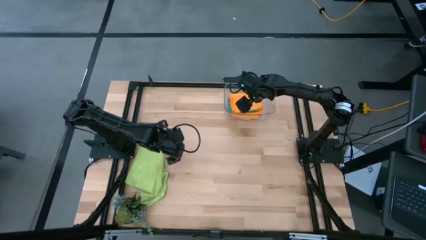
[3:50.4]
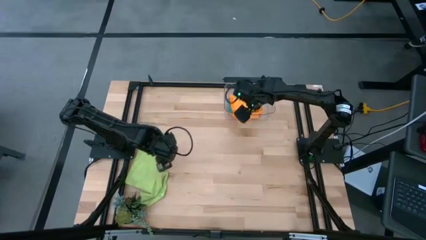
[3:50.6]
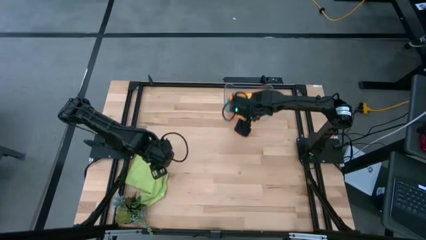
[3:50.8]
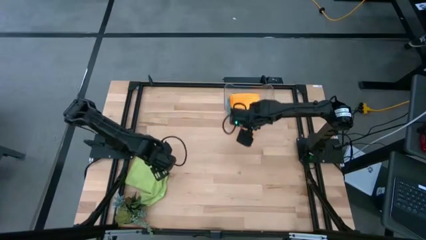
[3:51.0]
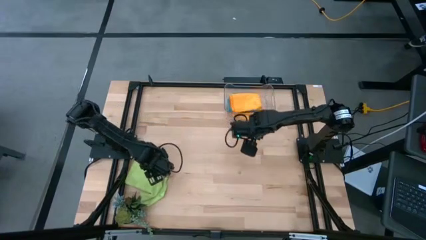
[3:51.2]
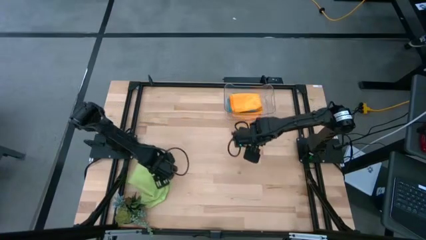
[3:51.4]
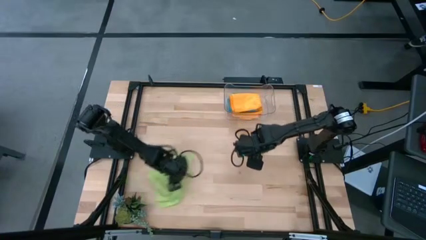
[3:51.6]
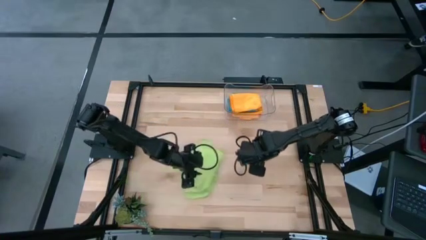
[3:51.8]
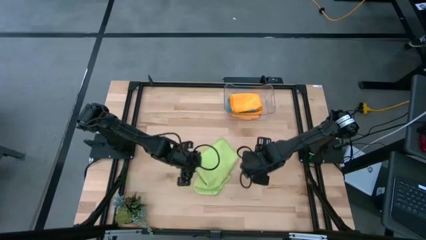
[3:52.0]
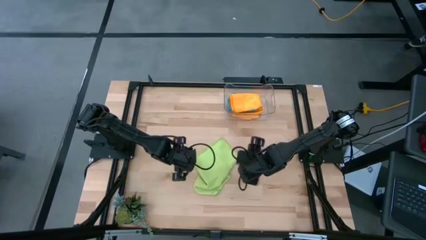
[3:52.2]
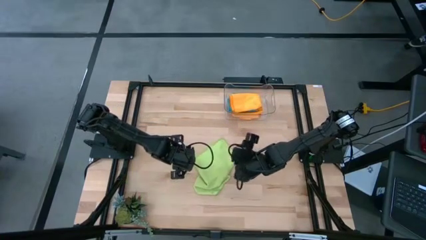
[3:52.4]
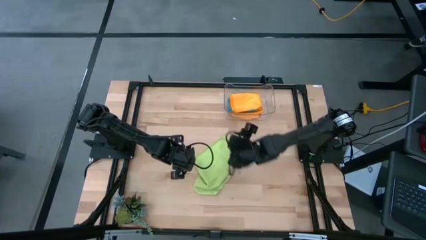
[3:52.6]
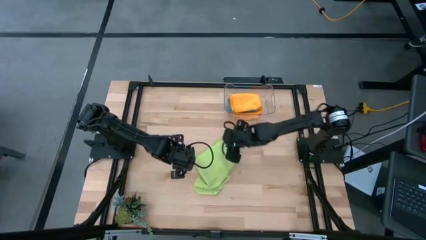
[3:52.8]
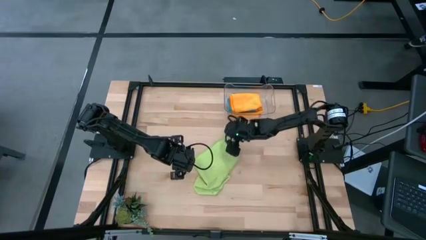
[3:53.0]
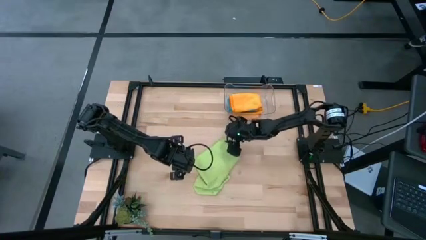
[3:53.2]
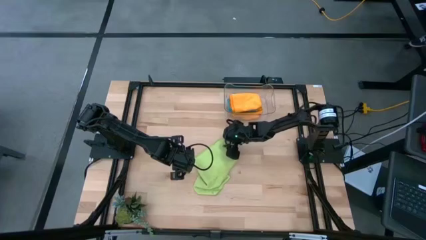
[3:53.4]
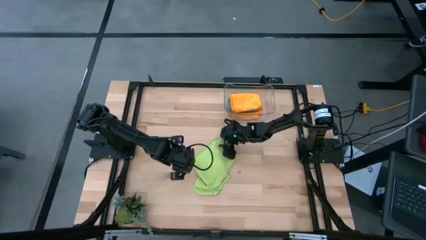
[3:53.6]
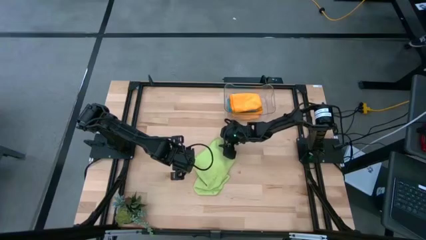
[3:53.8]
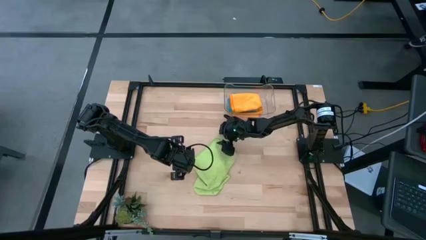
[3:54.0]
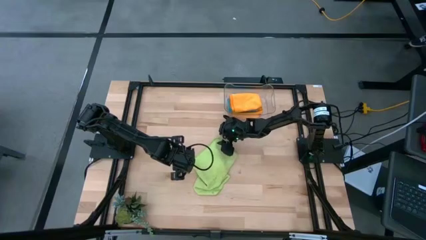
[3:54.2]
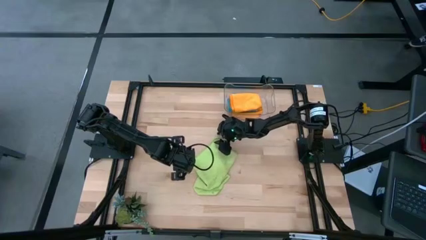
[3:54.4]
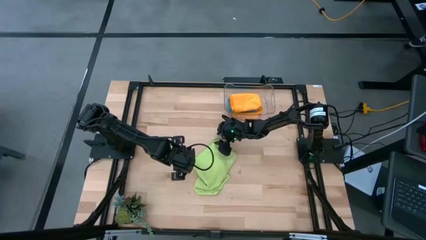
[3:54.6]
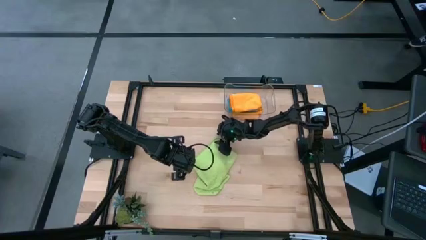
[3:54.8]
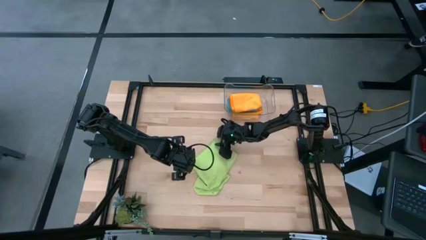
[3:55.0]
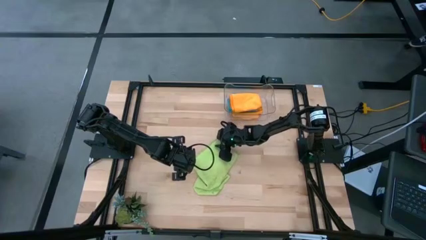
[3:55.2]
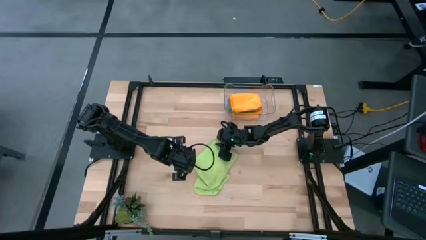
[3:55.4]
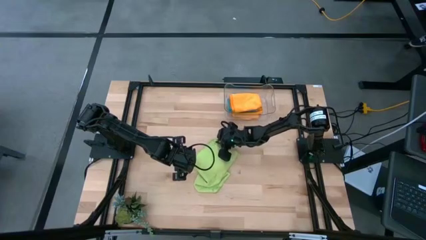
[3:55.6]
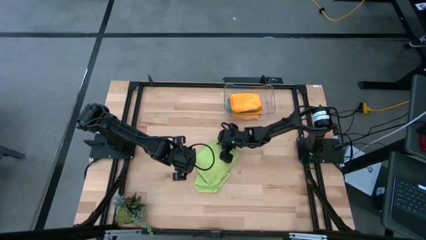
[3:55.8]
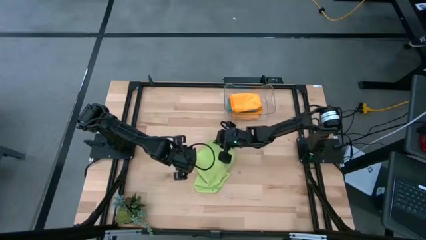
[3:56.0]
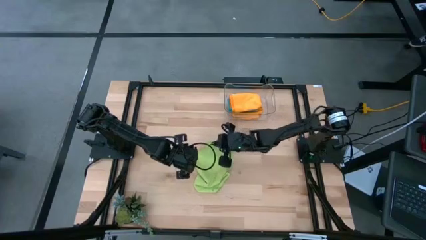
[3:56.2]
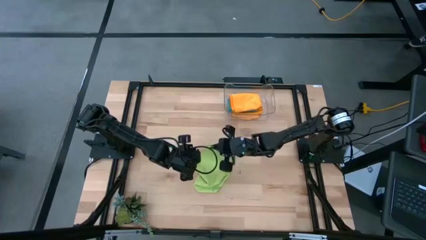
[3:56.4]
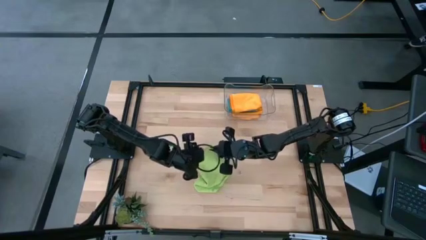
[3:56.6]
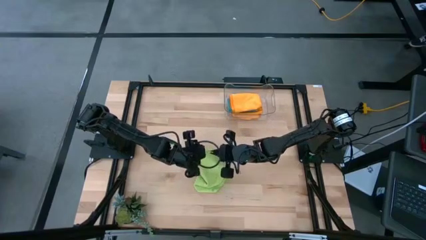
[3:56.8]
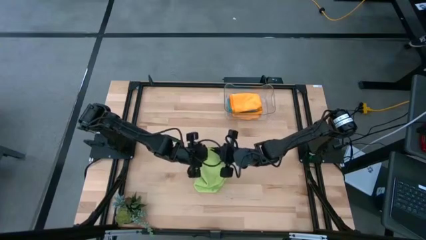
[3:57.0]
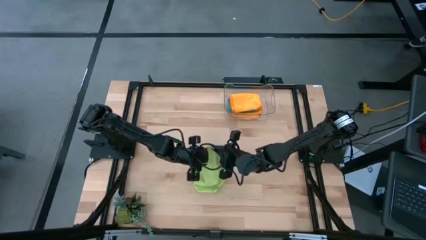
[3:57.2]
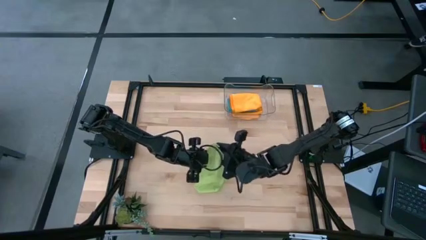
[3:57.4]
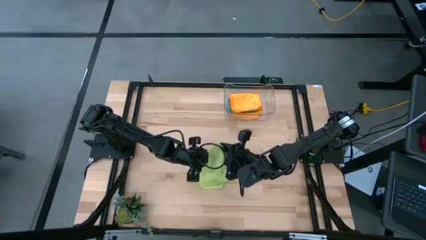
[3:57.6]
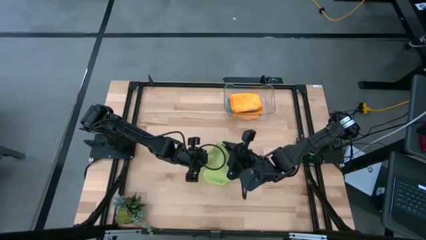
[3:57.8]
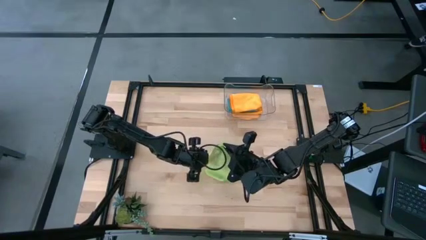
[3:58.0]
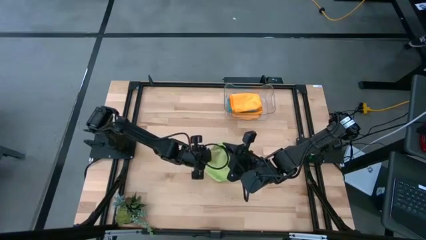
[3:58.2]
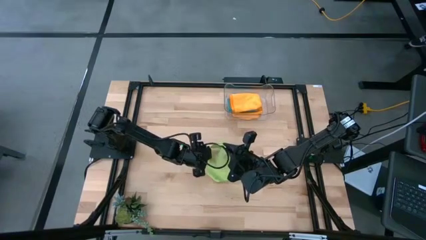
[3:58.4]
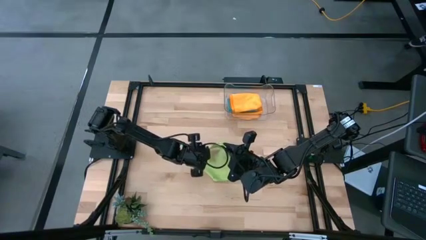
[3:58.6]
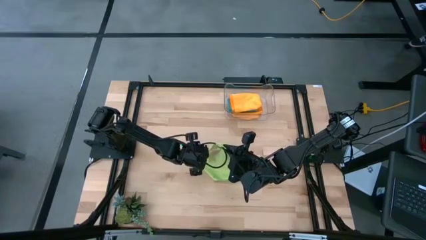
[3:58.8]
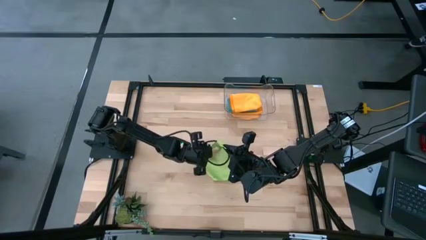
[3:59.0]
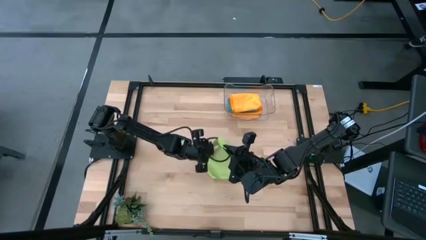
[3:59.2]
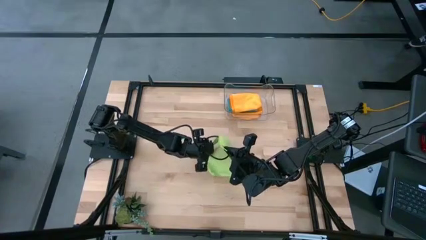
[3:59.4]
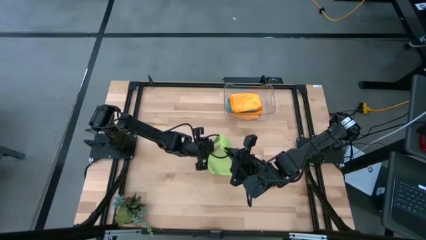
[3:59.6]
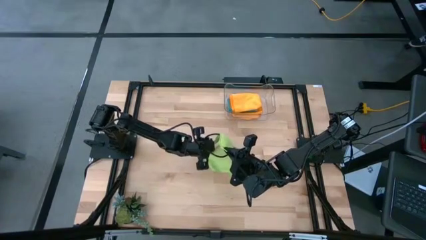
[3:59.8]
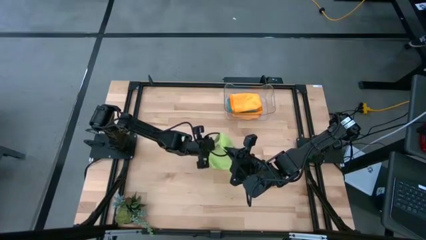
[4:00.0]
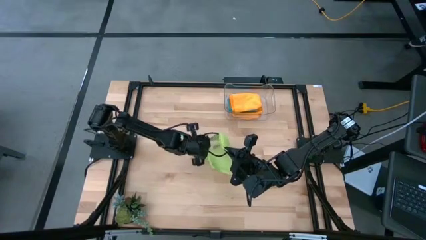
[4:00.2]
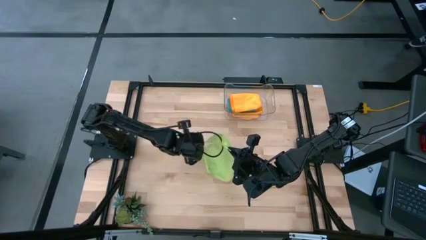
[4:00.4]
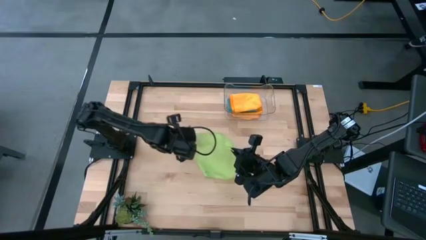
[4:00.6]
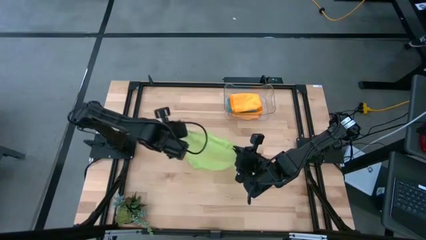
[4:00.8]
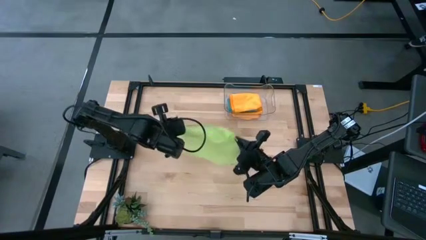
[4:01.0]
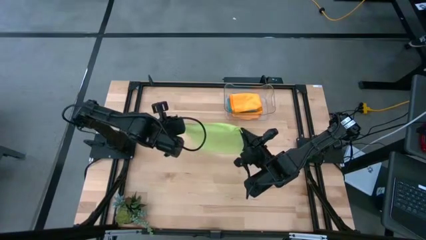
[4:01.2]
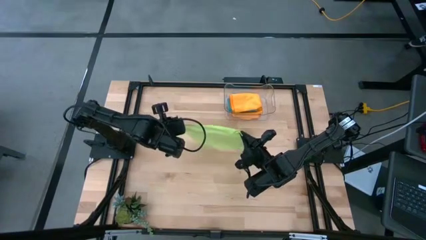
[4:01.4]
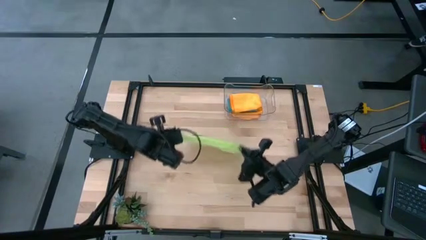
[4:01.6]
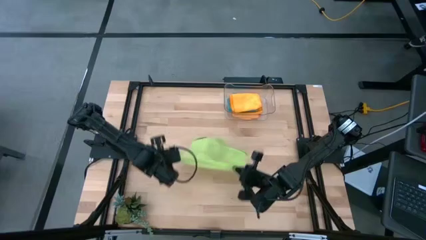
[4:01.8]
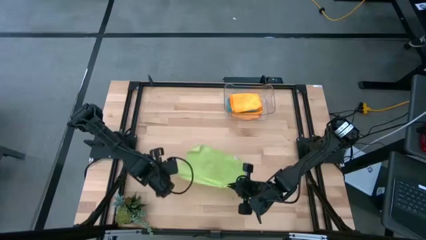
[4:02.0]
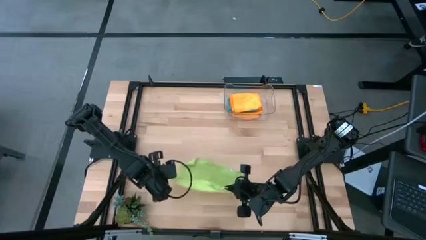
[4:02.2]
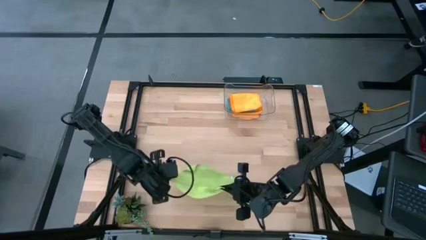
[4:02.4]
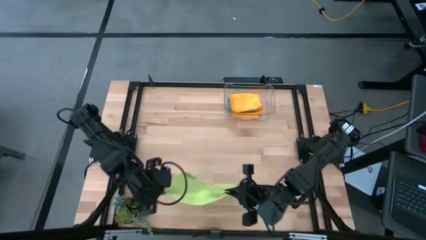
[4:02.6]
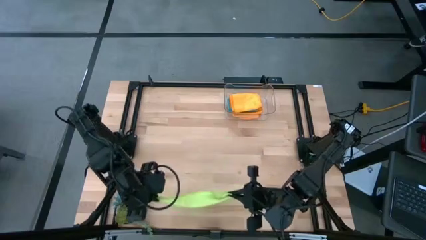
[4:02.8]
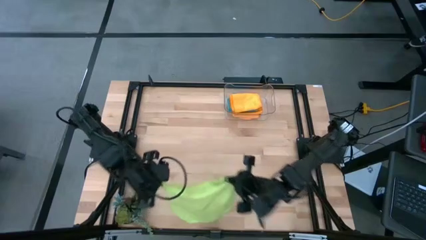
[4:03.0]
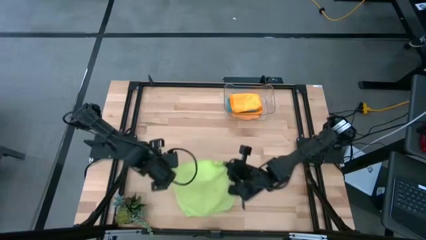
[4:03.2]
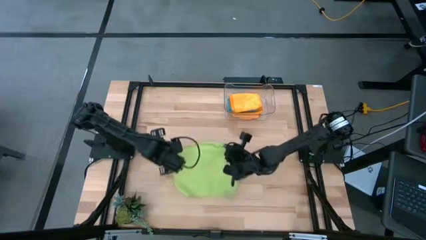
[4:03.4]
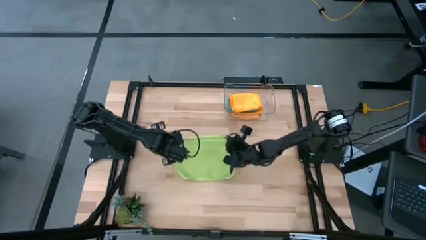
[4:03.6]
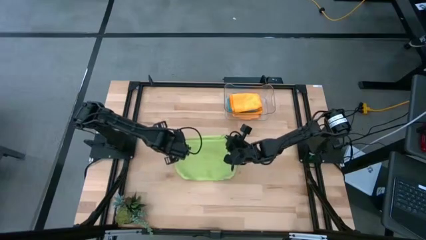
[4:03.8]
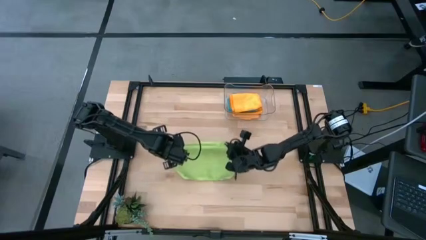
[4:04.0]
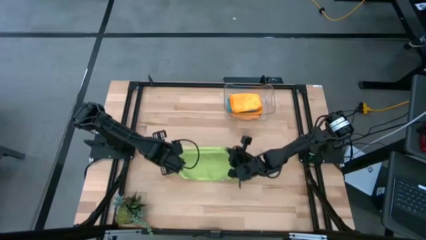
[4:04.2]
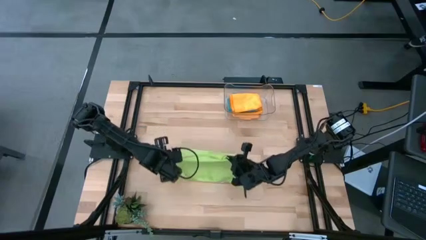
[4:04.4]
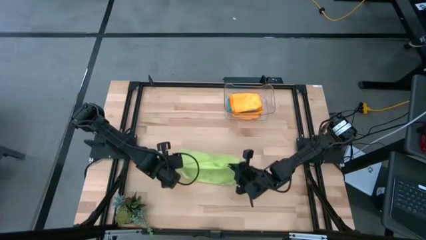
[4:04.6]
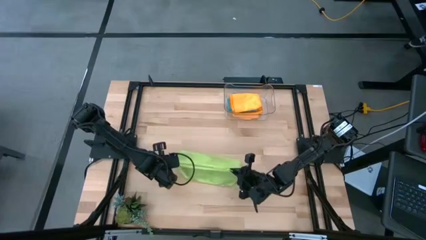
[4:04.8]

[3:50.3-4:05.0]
Task: Fold microfiber towels
Fold the green microfiber towel
